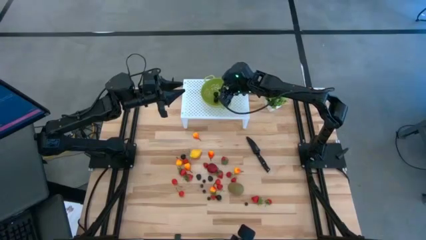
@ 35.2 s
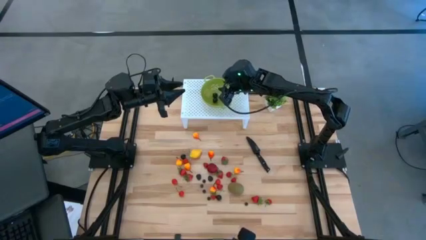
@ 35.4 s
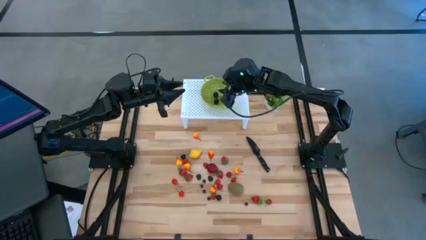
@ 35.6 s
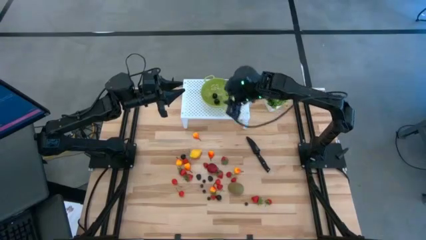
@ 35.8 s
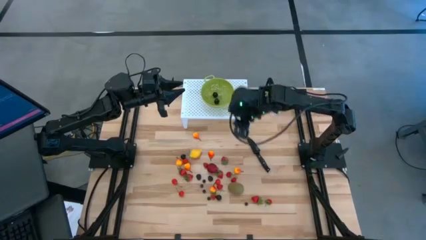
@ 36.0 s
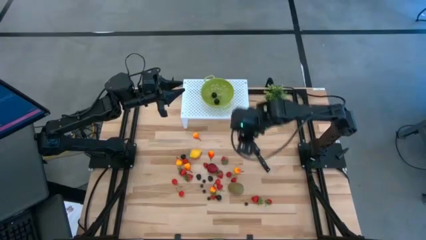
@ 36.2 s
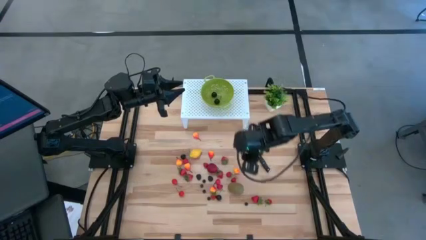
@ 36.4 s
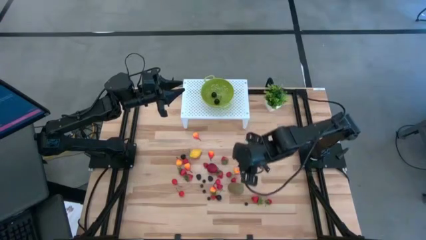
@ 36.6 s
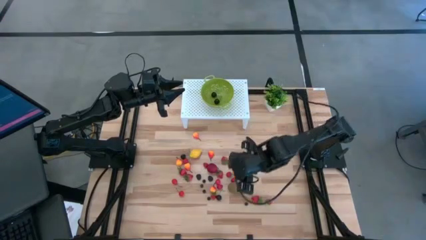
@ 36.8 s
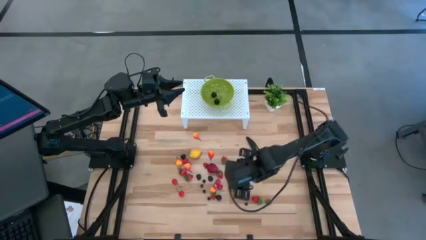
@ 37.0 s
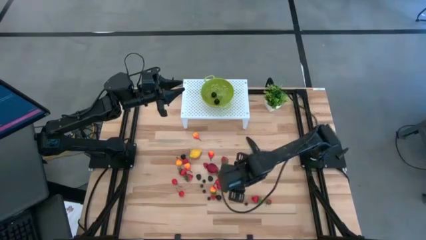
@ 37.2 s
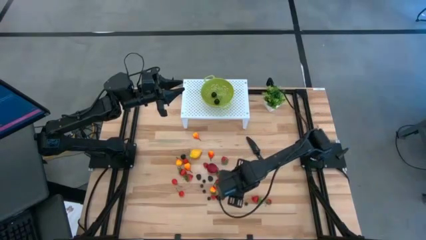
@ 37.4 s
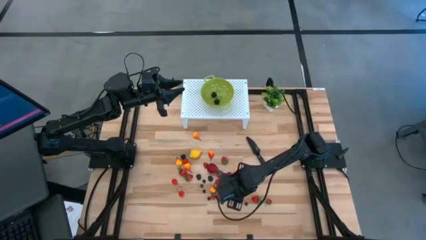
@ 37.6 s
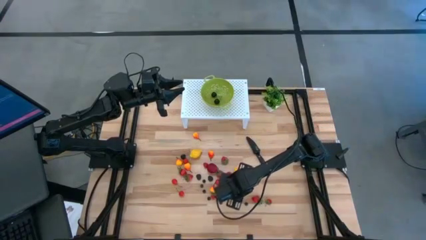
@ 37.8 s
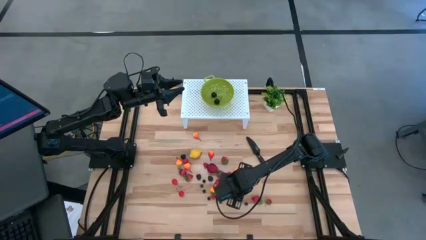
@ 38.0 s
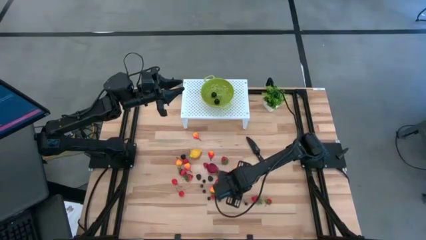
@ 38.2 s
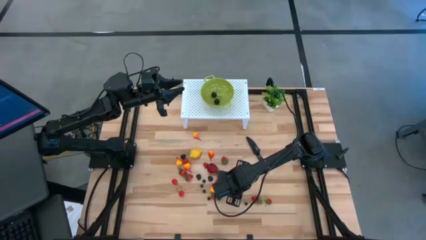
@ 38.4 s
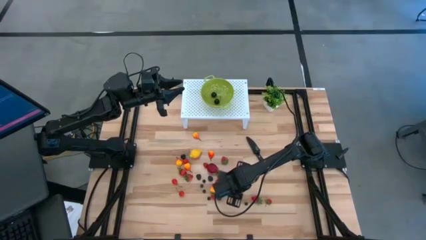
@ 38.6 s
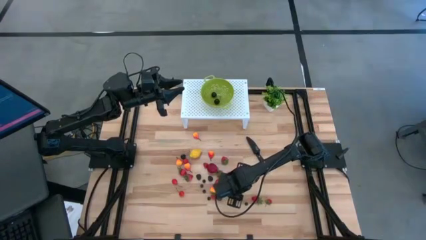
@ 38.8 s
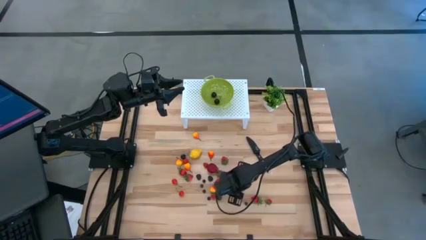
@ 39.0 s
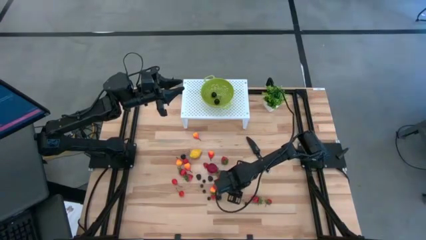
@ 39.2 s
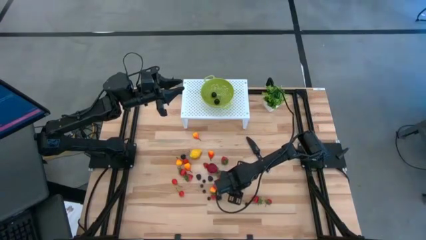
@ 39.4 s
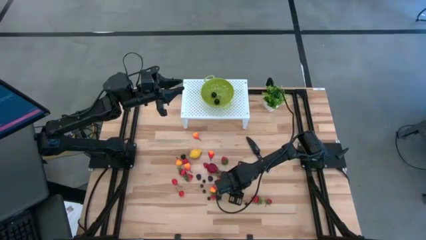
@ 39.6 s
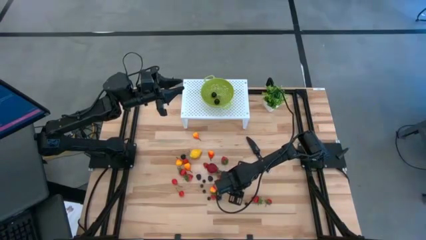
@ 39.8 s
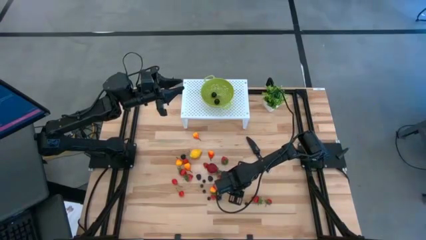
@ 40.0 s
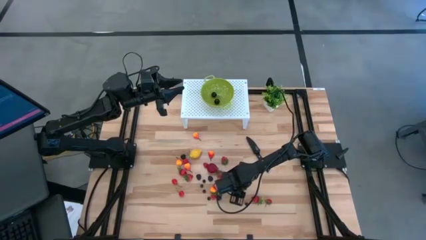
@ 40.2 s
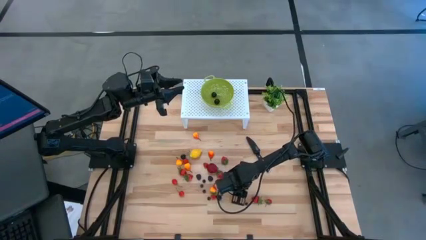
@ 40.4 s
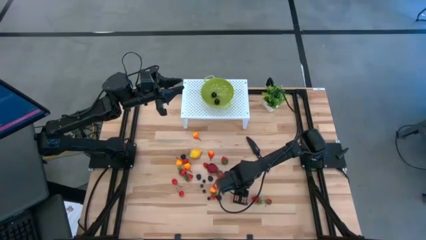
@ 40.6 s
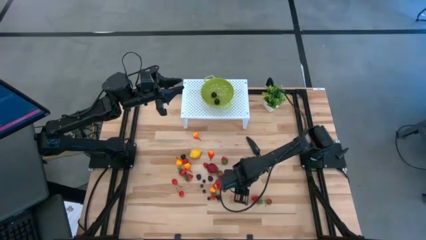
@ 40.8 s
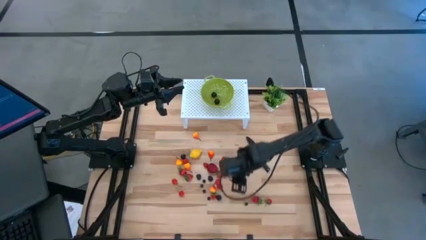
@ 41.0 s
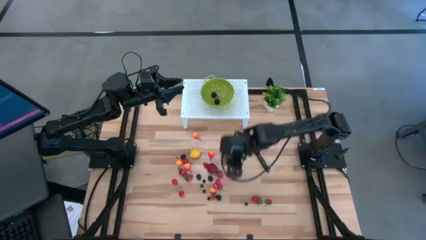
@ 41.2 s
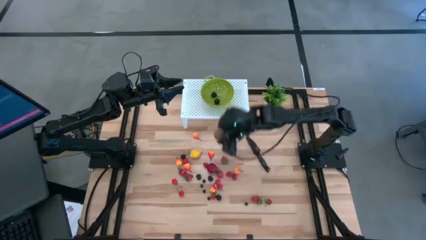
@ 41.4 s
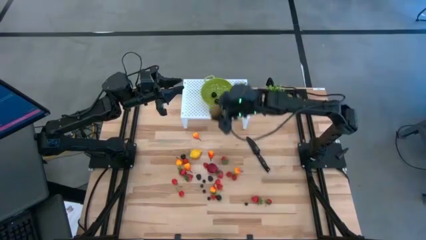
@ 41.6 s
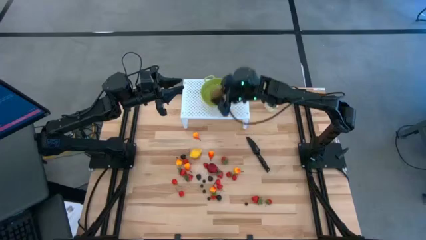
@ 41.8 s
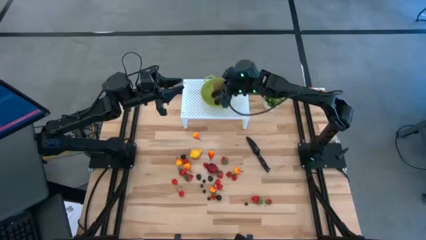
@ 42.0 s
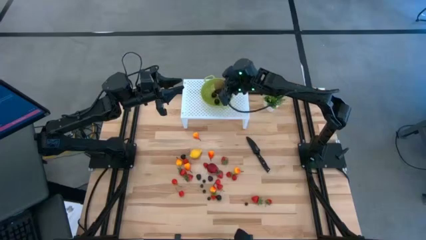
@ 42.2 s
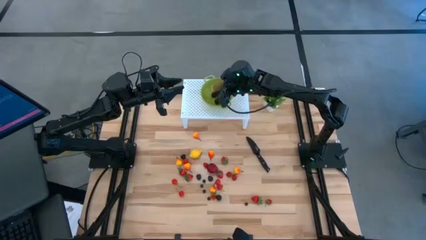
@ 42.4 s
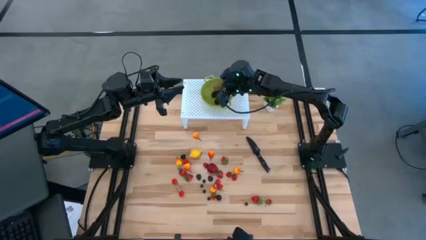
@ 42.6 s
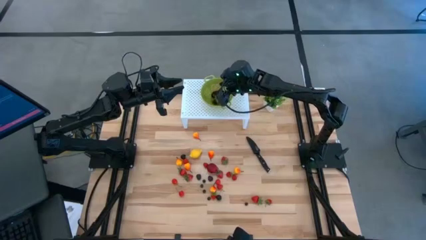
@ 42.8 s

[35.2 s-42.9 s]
Task: Pick & Place Fruit
Put the brown kiwi into the green strainer bowl

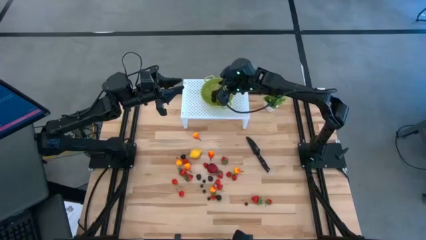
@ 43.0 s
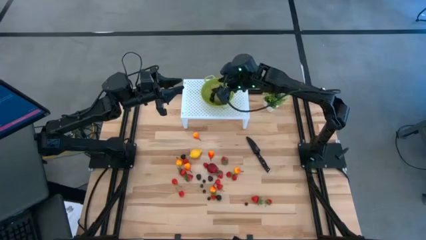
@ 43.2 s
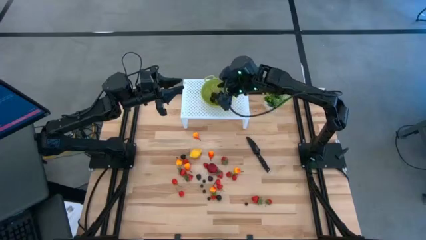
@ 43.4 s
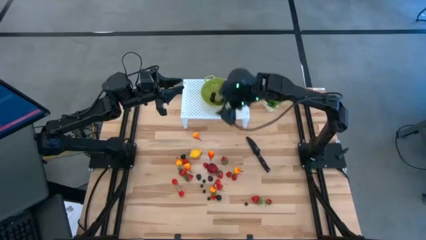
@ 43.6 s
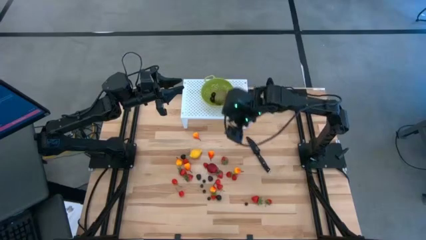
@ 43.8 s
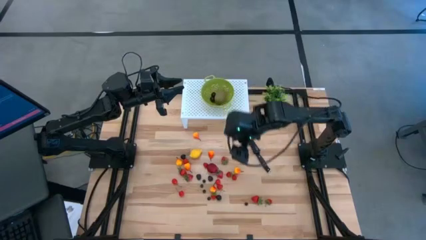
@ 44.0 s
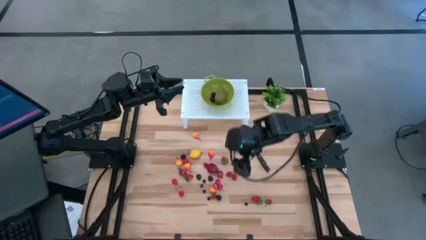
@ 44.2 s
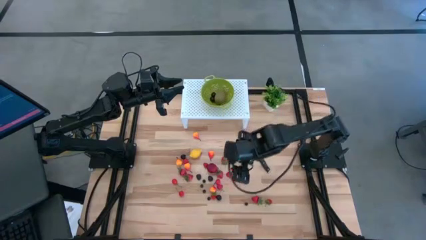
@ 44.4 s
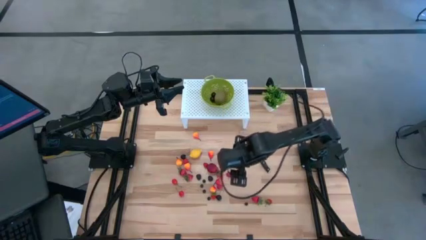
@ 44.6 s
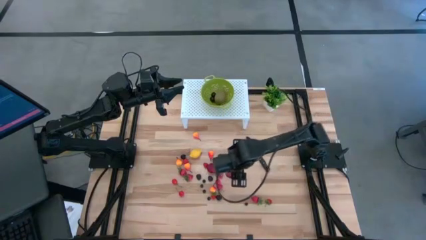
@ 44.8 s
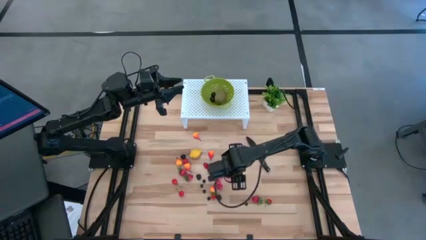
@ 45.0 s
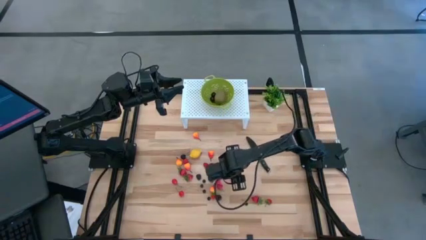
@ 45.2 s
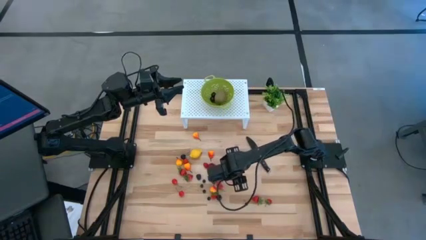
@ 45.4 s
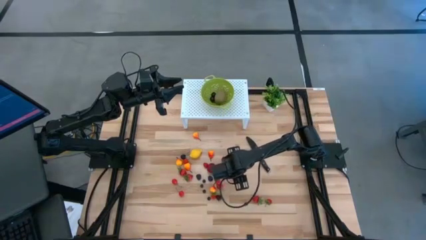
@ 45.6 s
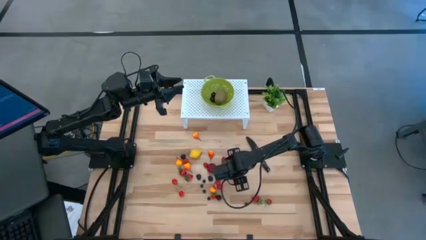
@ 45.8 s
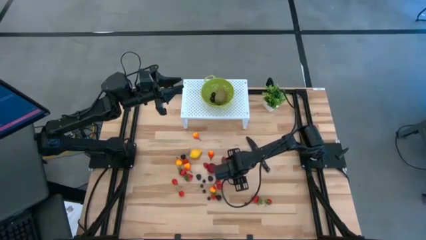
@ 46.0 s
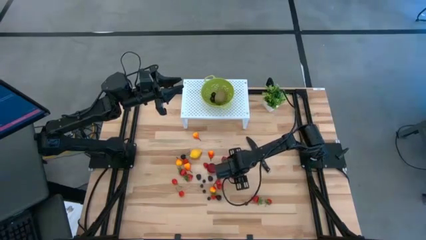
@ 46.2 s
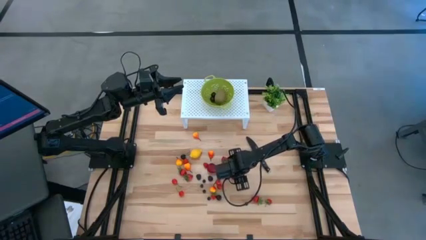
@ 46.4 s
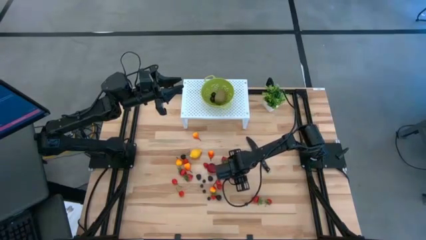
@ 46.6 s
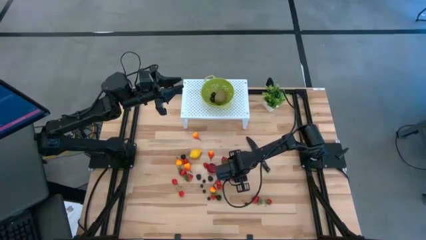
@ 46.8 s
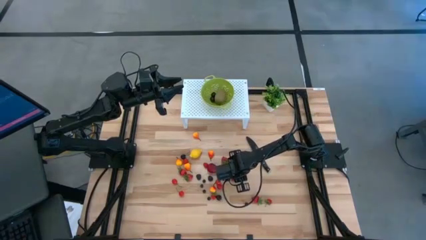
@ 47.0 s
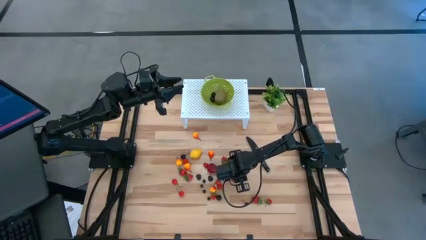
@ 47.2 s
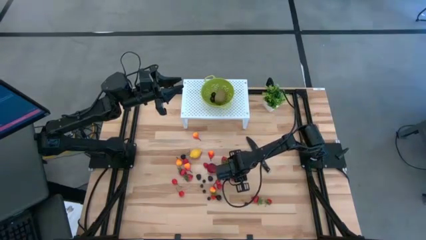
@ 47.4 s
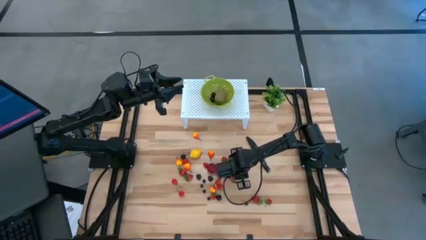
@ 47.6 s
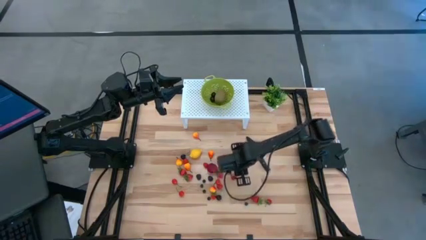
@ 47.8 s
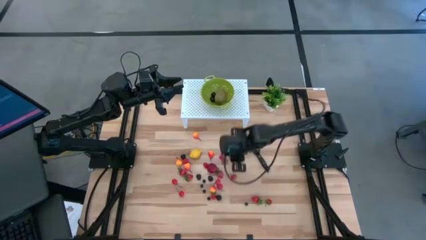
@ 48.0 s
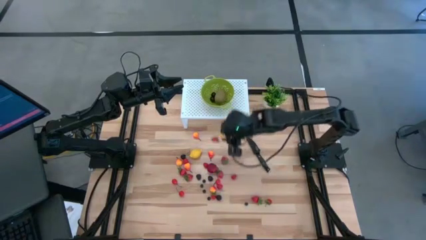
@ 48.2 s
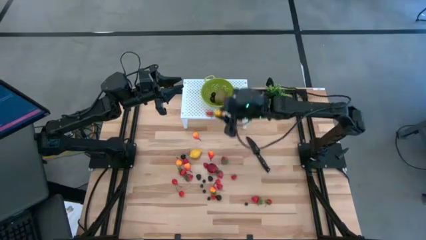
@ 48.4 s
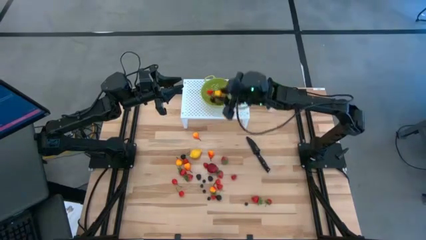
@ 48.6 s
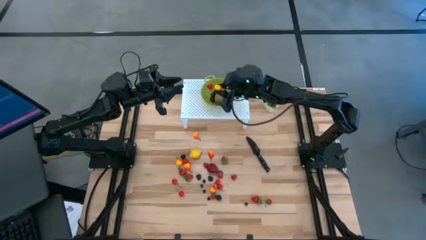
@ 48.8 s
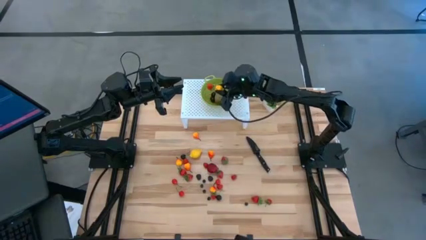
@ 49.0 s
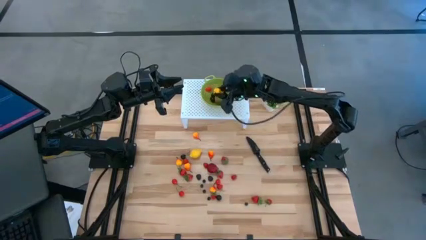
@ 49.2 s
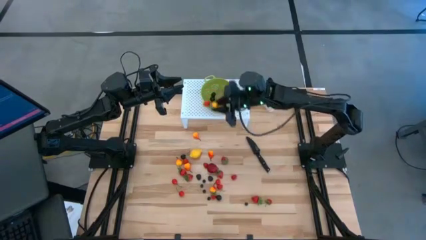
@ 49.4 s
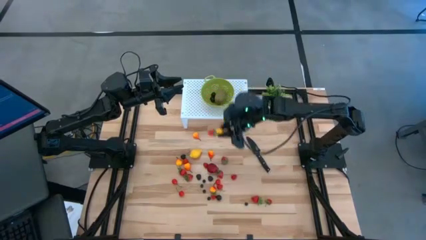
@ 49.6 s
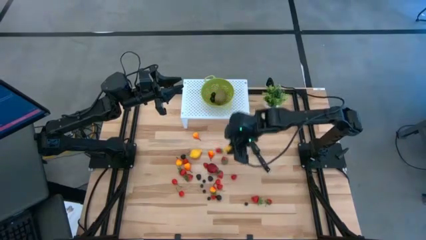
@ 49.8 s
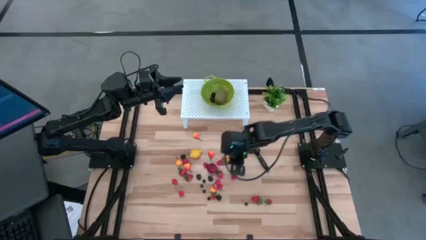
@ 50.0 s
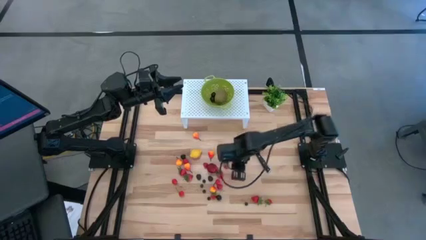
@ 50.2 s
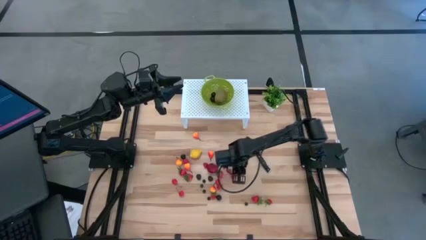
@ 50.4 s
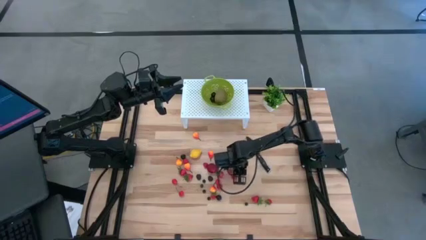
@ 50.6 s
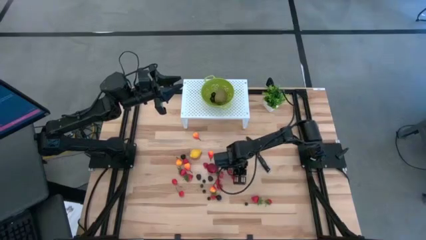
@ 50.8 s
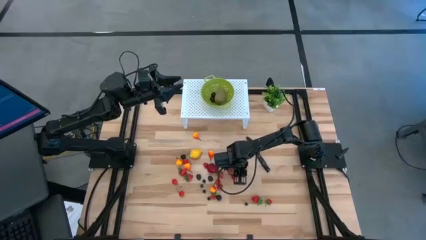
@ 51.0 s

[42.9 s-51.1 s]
Put the yellow peach into the green strainer bowl
